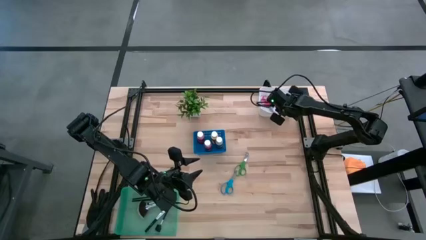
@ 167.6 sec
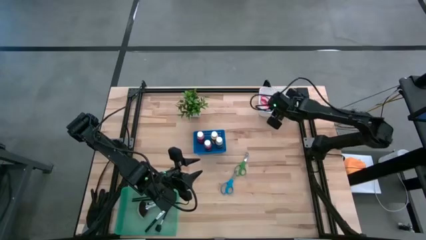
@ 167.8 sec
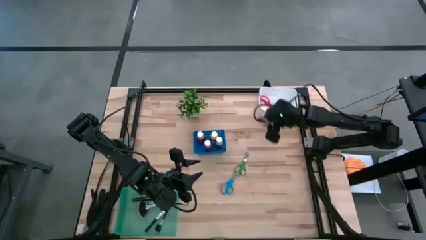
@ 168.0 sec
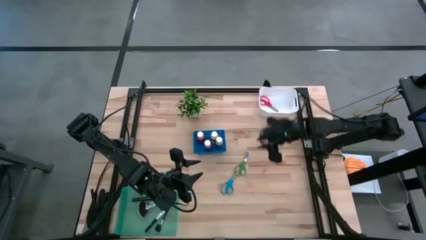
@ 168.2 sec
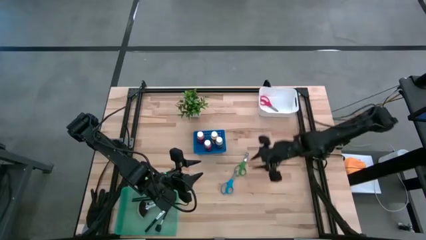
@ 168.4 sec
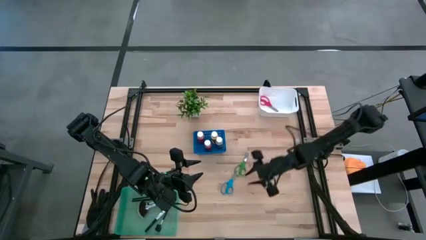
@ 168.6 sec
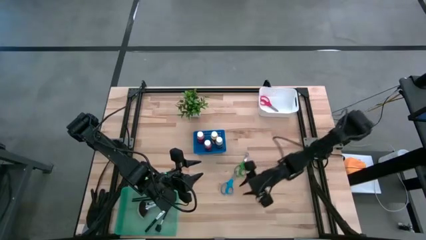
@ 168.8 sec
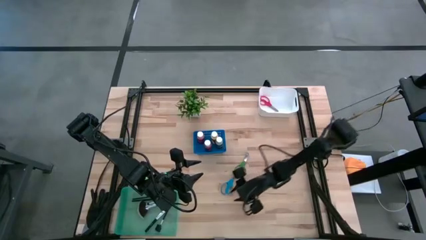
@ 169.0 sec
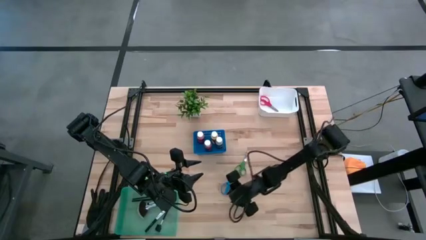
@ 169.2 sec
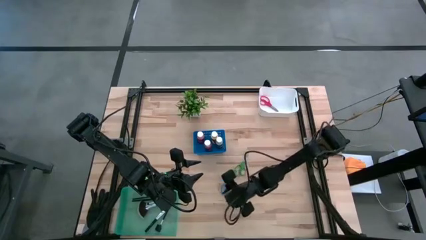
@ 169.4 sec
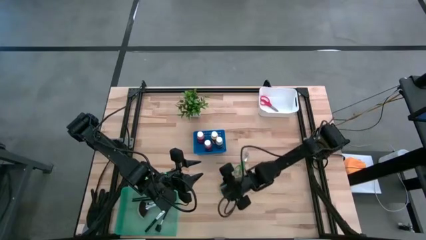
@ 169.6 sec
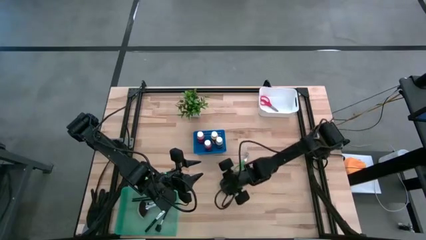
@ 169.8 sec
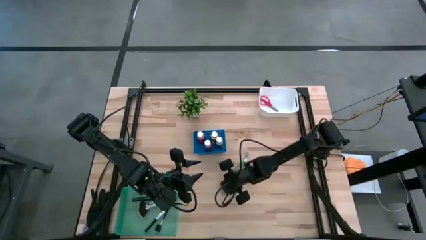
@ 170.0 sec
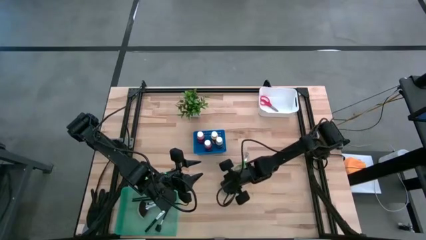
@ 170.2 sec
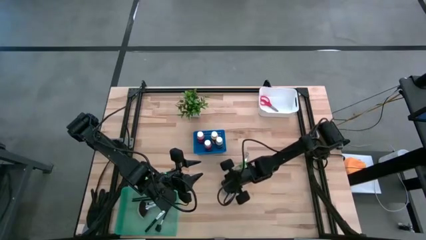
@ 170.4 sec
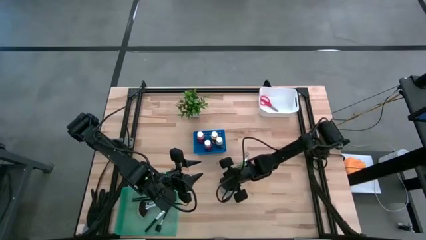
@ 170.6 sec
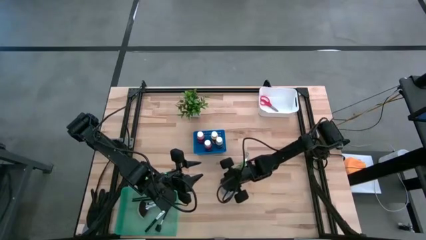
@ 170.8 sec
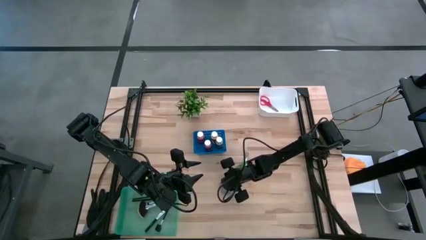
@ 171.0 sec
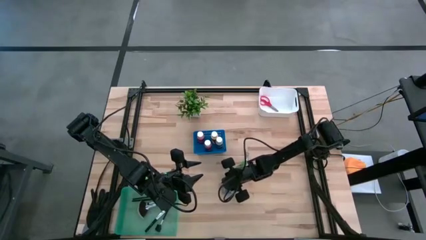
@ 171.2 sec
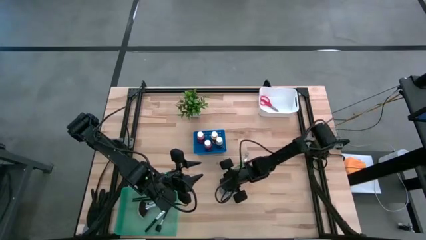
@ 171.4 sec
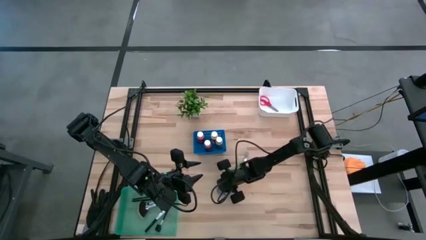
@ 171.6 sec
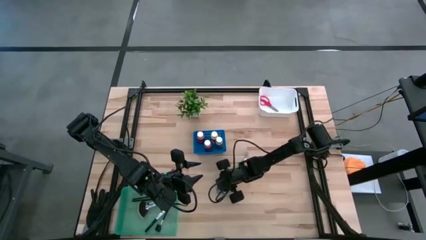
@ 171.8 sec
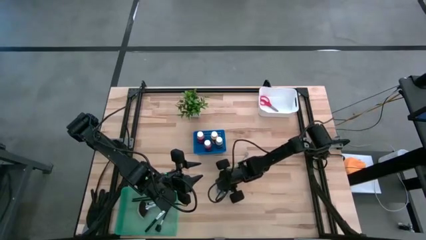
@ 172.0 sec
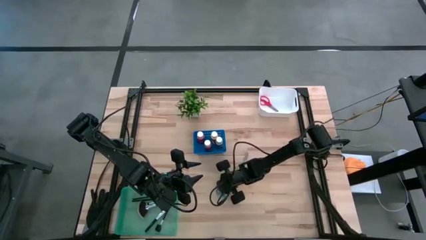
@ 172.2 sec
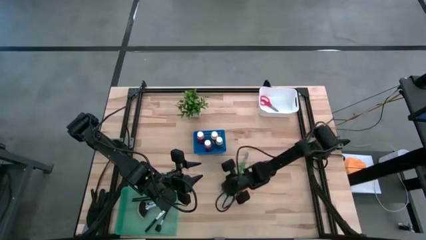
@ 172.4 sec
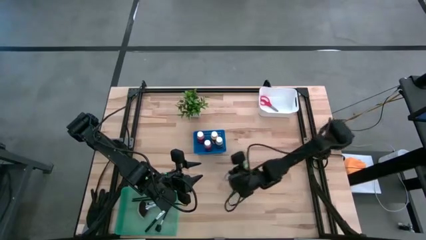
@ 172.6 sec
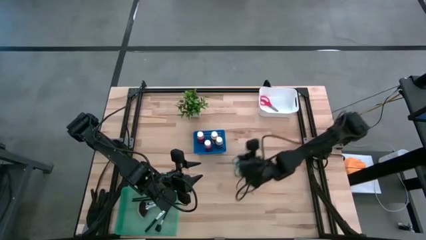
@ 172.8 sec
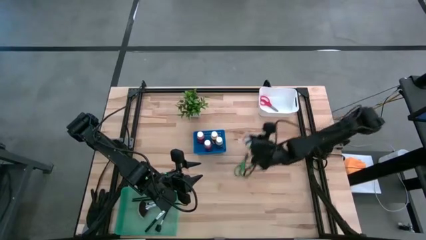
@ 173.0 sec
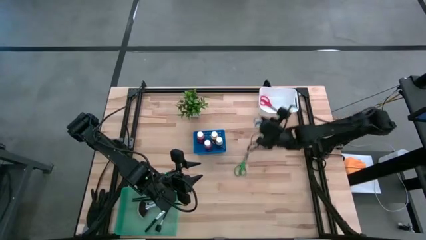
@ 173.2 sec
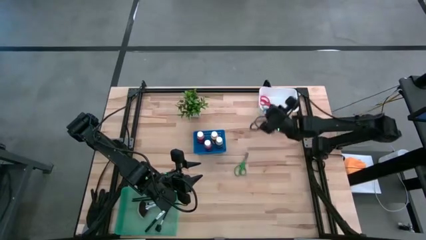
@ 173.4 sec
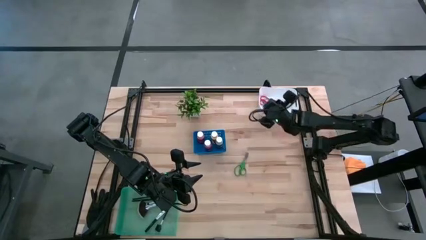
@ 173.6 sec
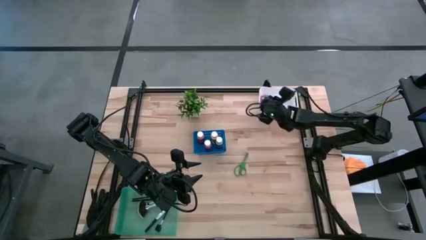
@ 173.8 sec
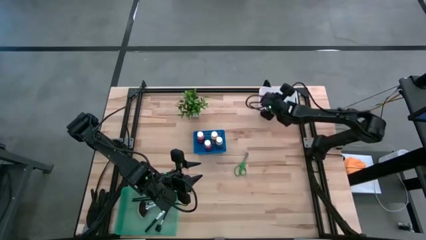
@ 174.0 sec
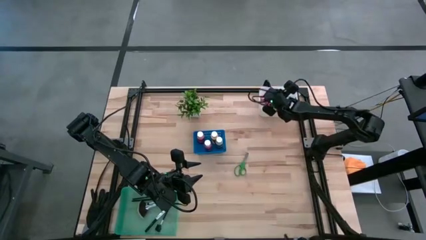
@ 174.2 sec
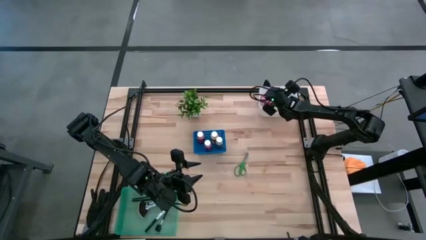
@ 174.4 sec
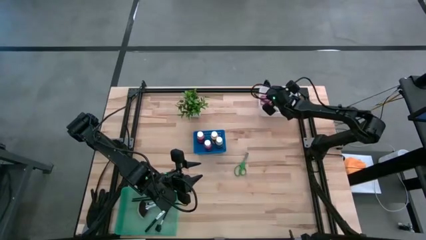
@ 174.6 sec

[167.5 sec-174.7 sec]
Task: Pick & Place Paint Supplies
Put the blue scissor into the white bin

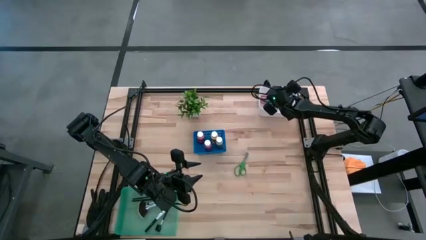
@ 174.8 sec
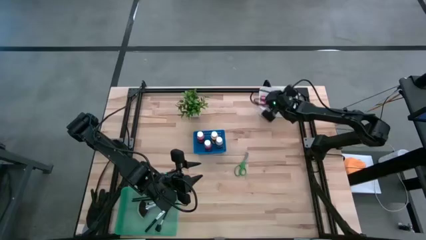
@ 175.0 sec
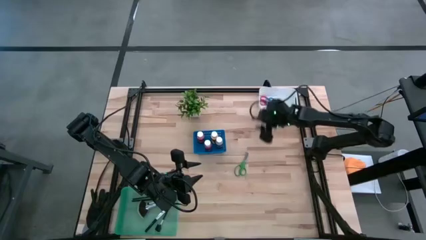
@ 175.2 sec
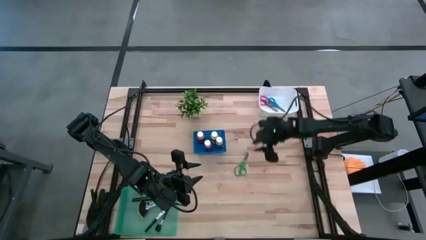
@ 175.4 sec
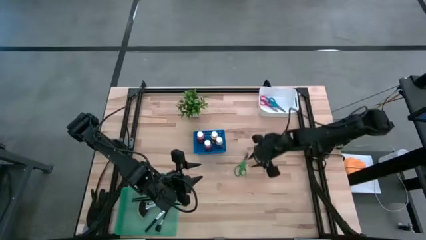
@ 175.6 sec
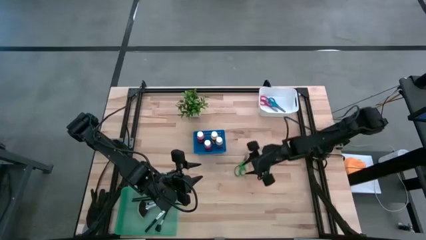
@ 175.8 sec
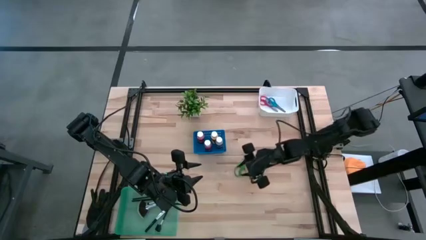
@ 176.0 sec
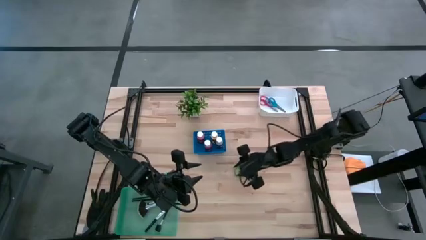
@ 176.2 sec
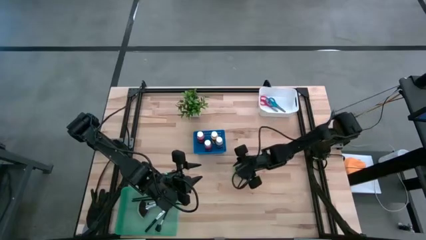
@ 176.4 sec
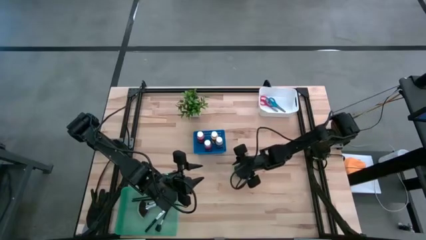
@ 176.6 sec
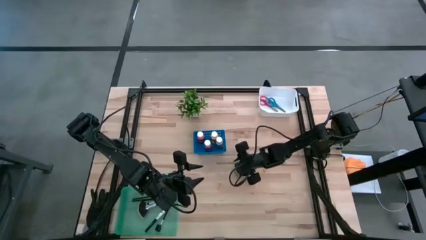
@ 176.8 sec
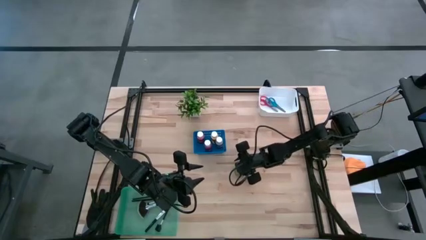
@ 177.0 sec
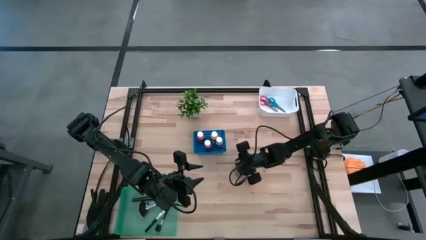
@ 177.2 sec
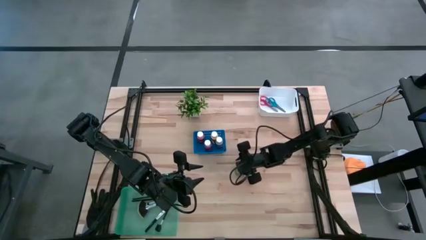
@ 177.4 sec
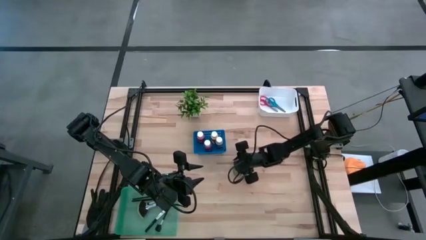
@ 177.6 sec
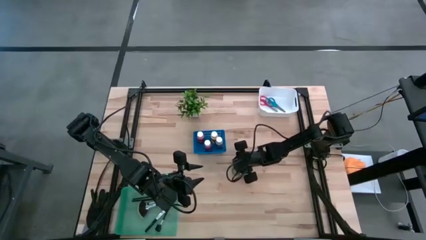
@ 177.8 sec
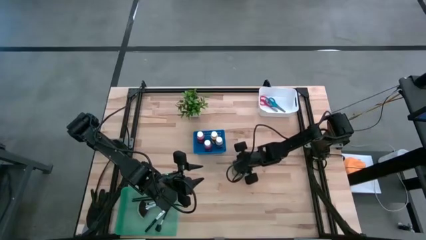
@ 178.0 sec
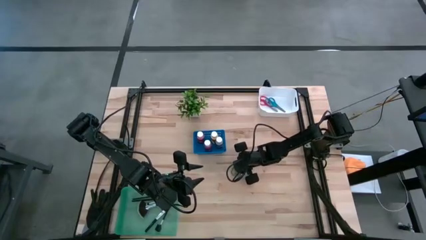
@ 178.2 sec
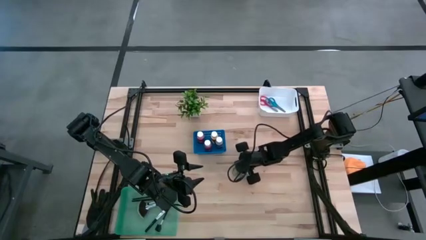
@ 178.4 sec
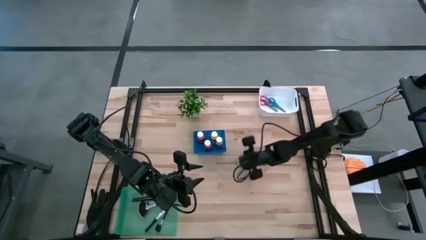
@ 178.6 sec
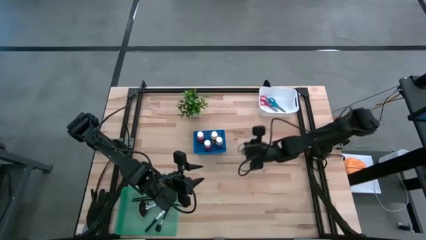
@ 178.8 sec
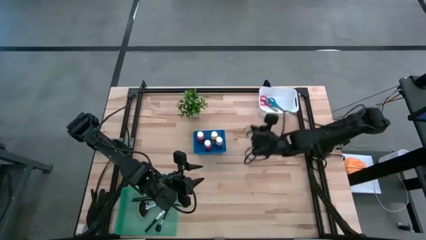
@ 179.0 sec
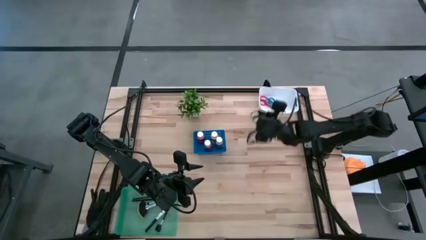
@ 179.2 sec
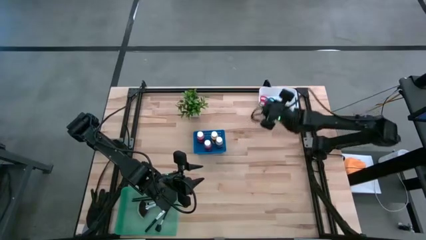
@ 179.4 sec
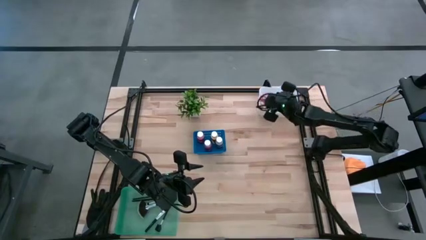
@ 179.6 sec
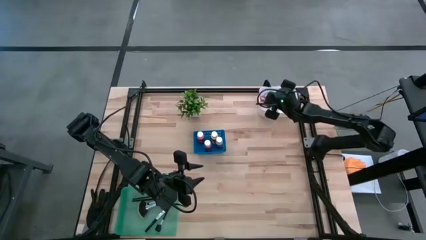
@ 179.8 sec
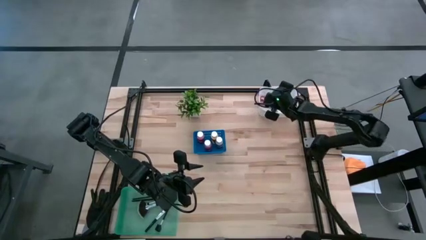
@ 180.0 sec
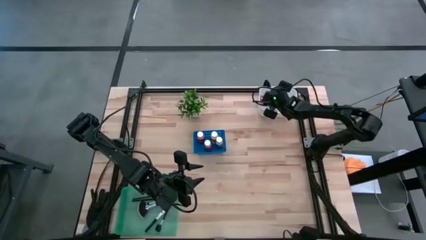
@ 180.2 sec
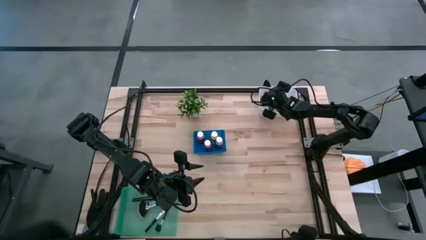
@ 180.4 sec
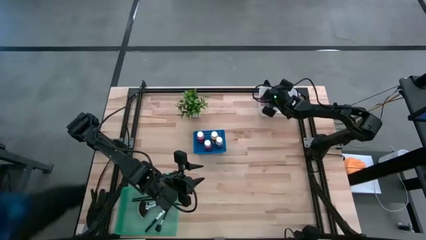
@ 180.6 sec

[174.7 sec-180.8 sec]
Put the green scissor into the white bin
